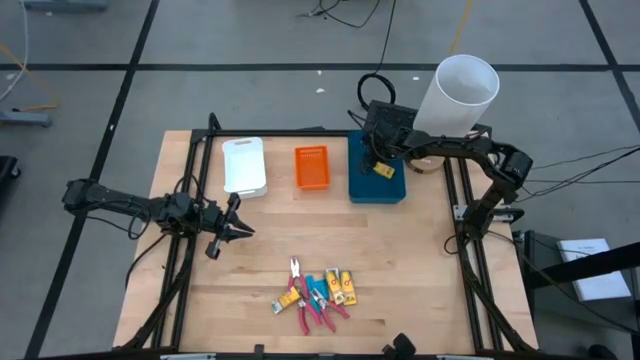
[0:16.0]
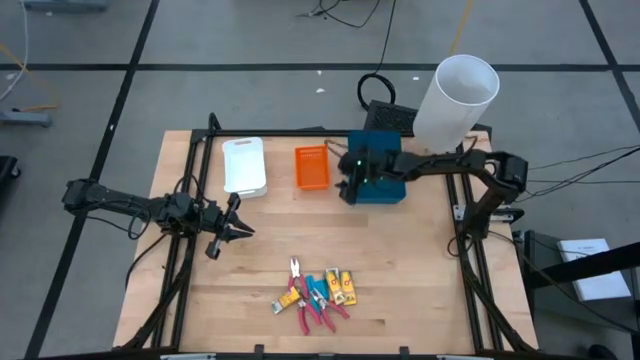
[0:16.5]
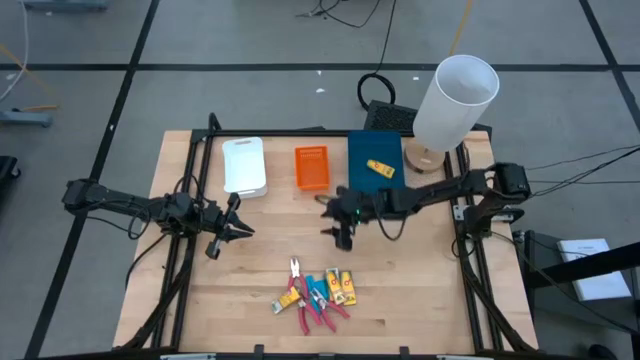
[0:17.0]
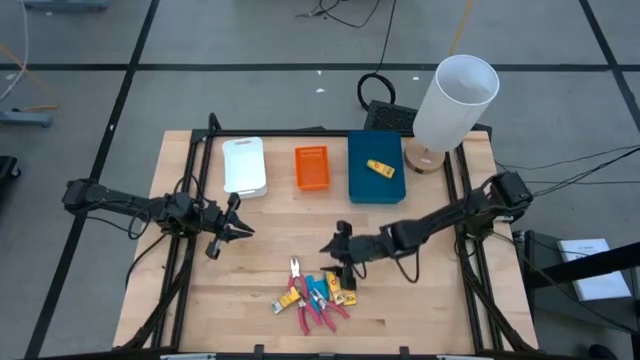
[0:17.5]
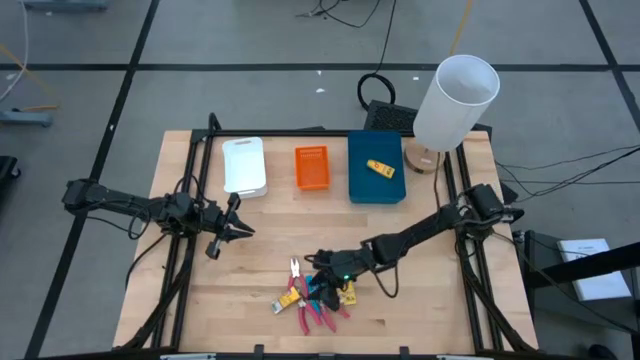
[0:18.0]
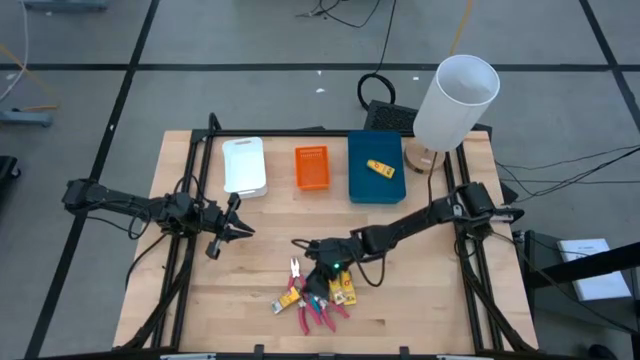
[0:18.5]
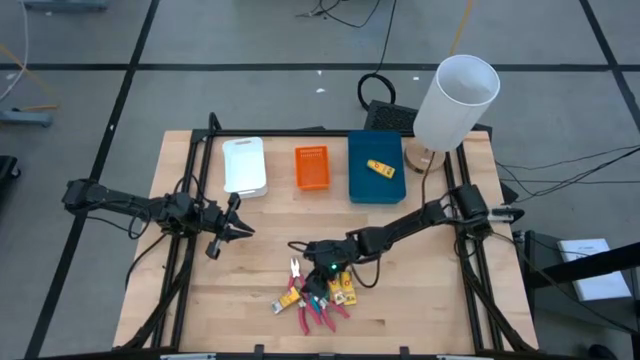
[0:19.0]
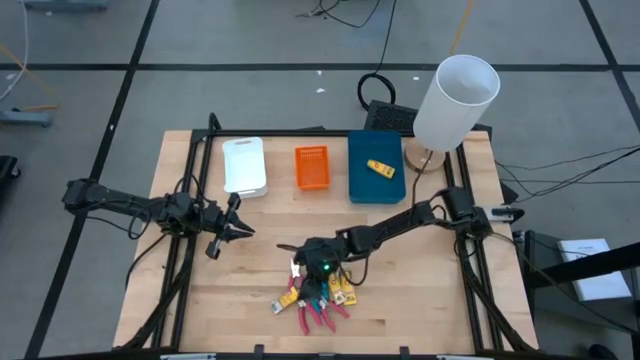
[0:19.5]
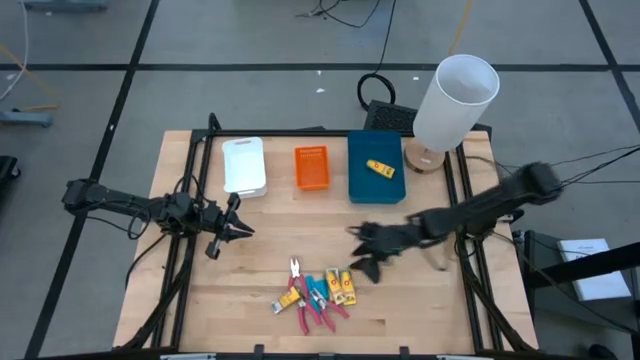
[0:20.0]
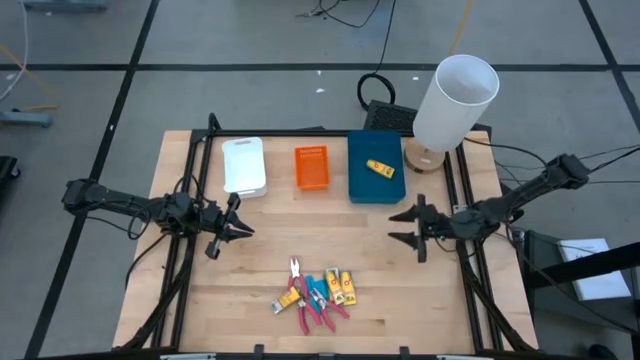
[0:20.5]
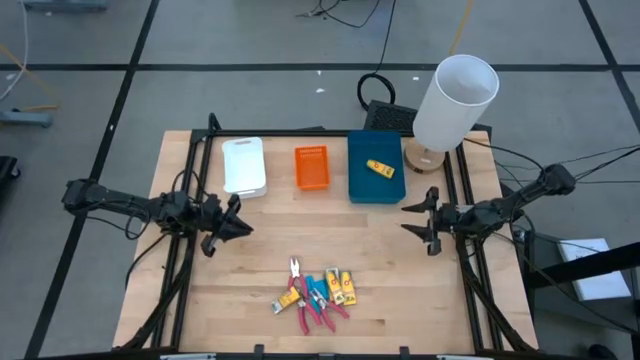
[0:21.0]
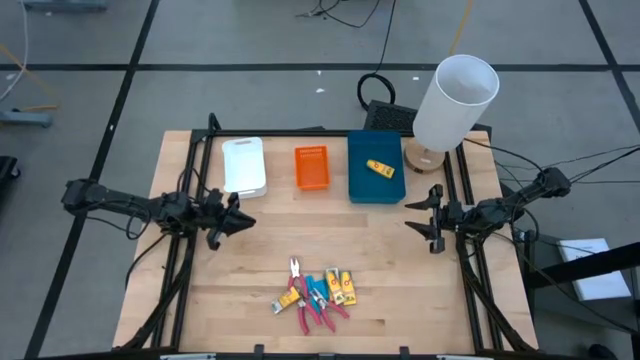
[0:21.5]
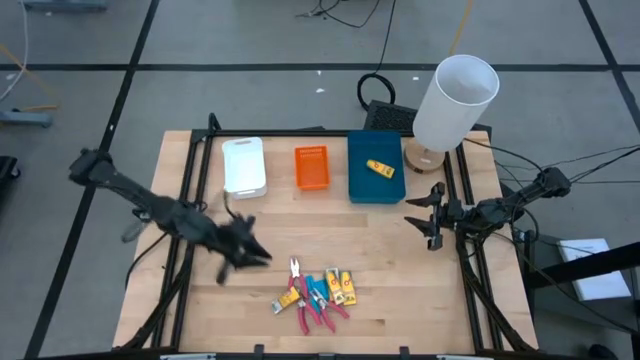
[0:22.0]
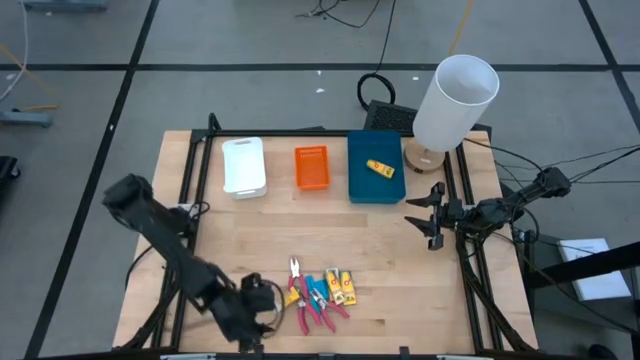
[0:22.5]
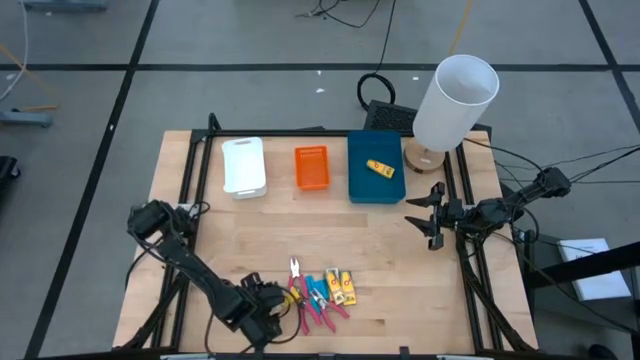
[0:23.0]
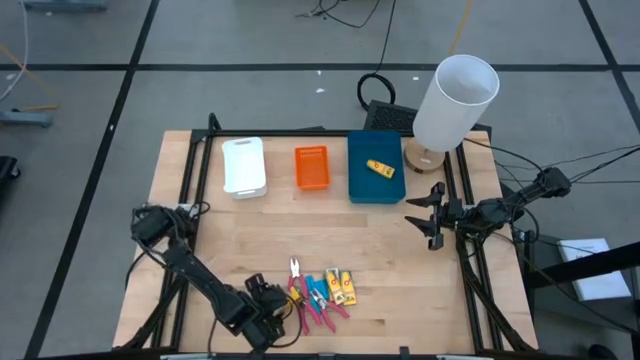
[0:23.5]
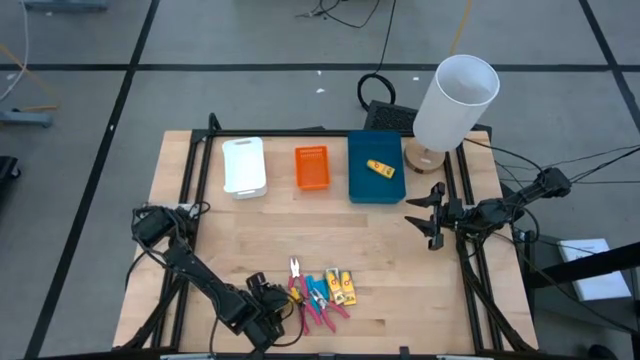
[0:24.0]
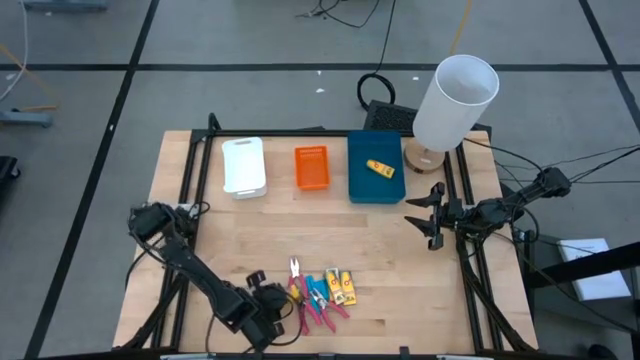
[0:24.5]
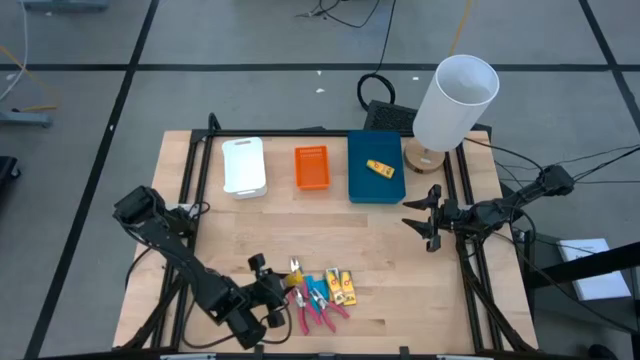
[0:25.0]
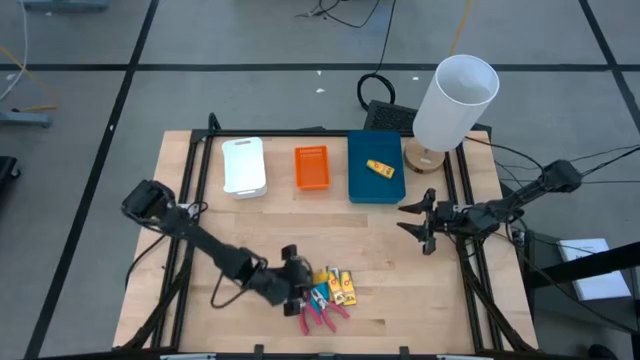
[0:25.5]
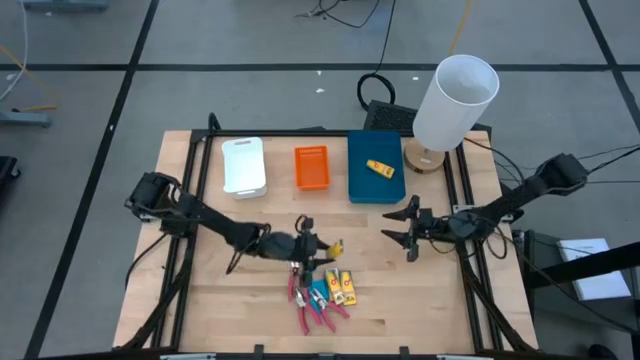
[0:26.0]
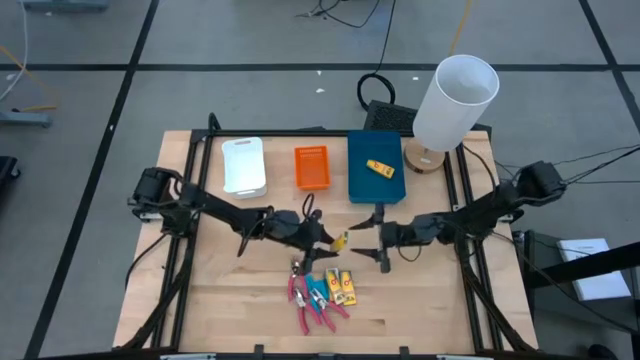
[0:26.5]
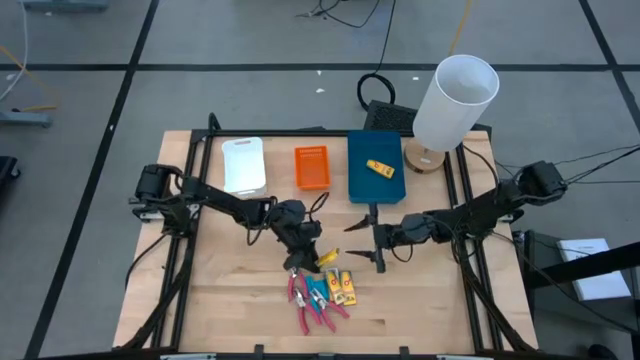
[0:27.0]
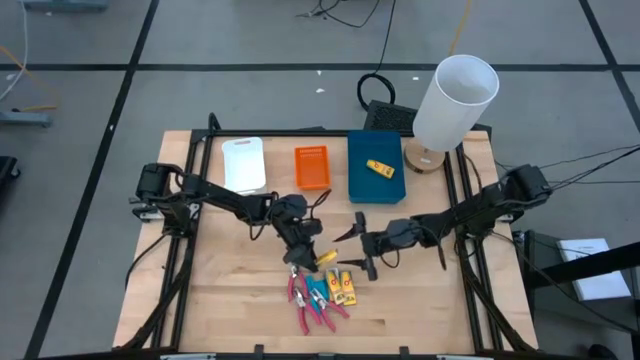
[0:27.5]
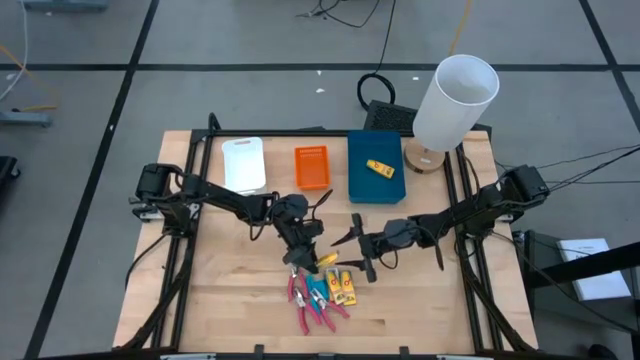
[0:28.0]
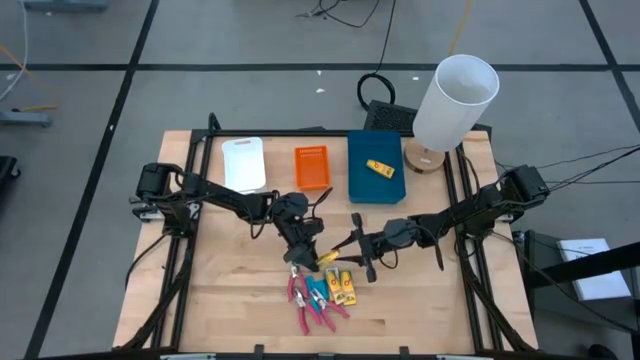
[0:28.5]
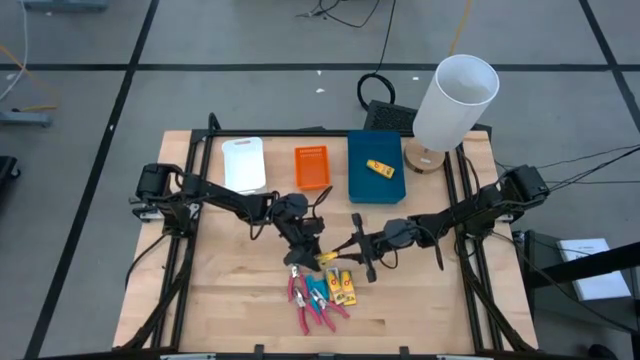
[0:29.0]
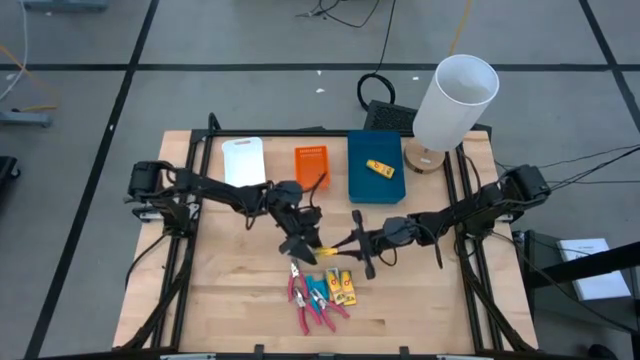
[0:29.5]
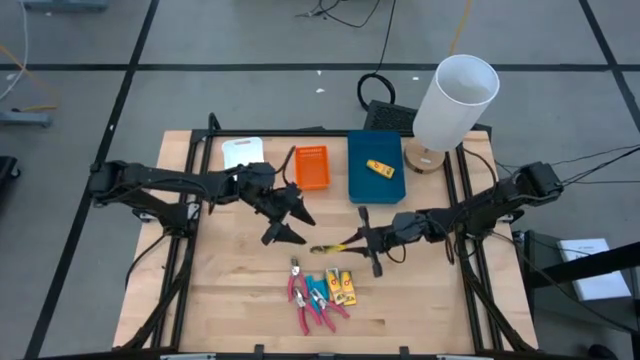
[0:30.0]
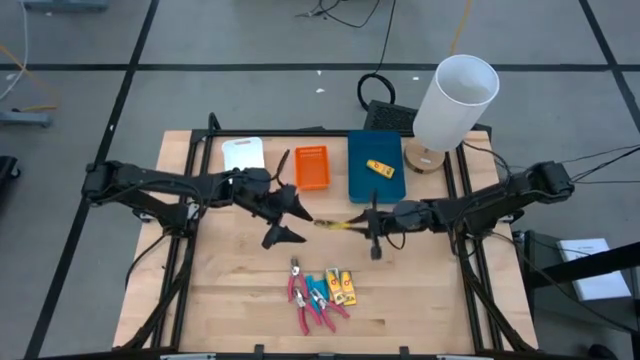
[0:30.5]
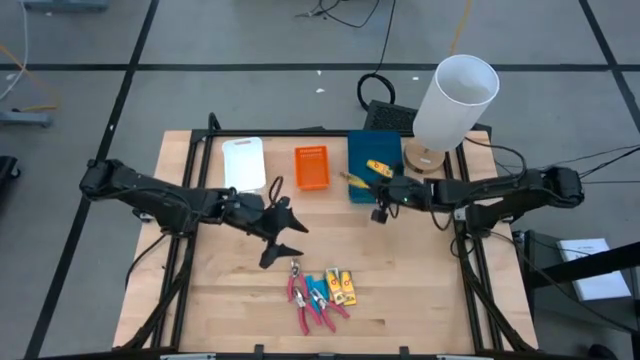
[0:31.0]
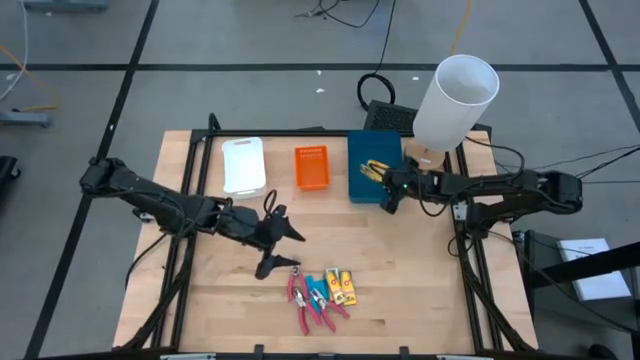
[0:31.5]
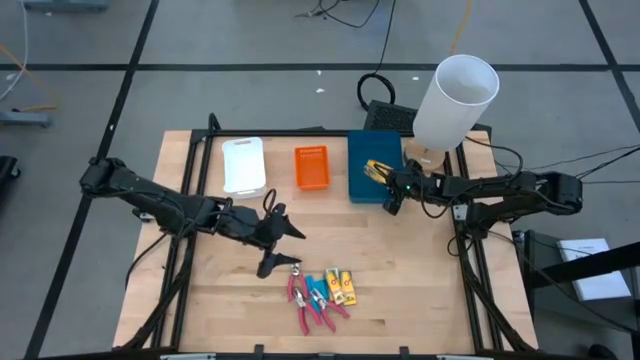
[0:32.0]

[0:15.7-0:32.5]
Task: Pick & Place School Supplies
Put the crayon box into the blue bin

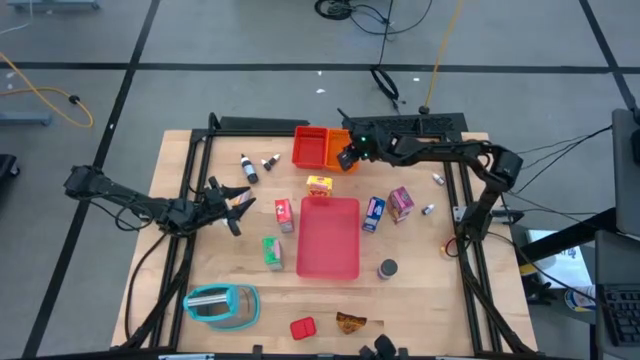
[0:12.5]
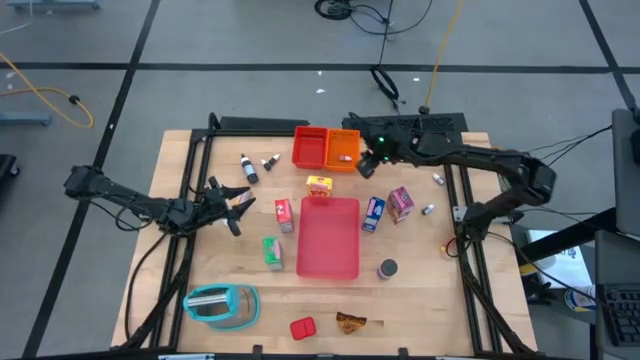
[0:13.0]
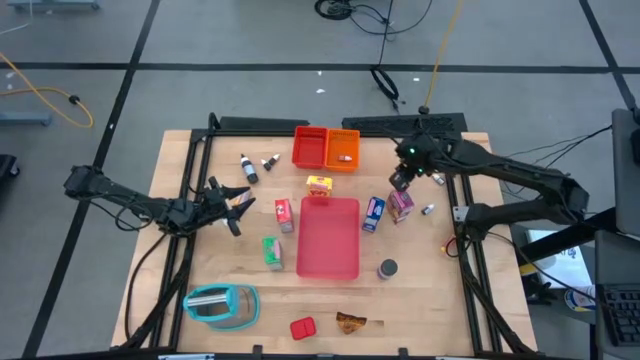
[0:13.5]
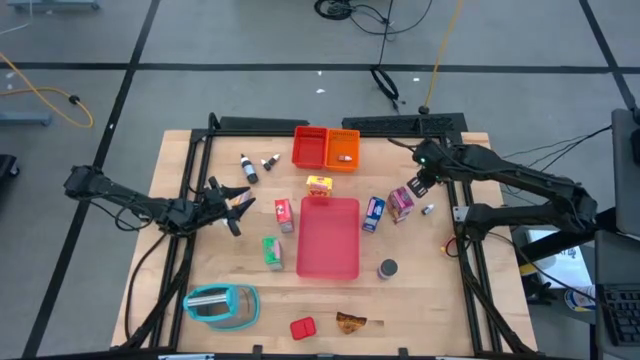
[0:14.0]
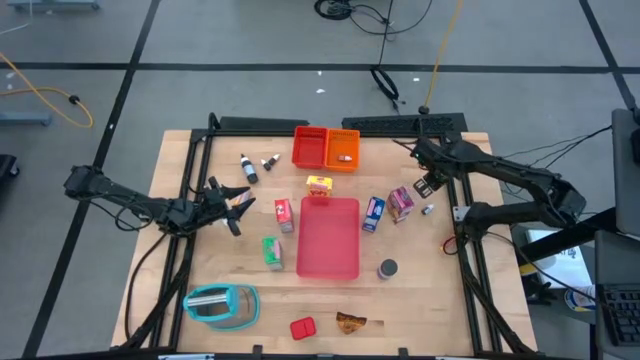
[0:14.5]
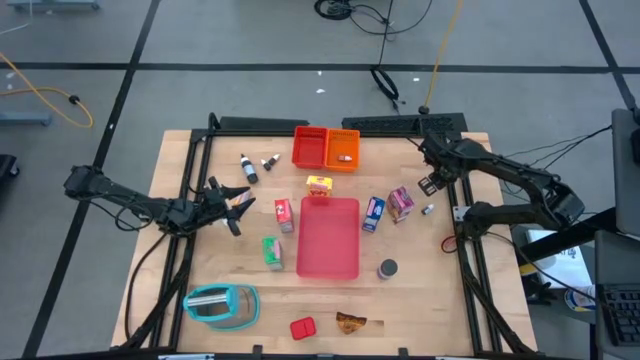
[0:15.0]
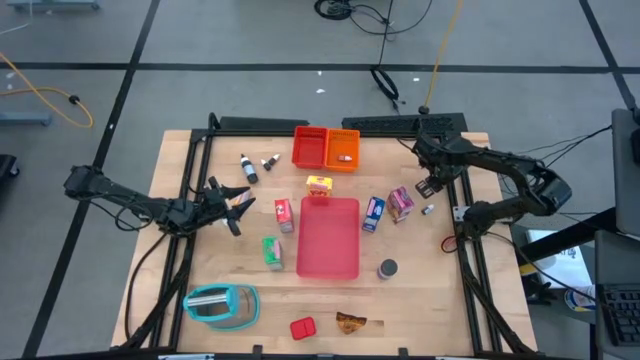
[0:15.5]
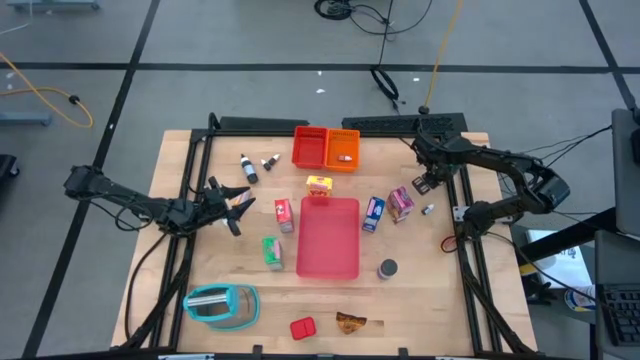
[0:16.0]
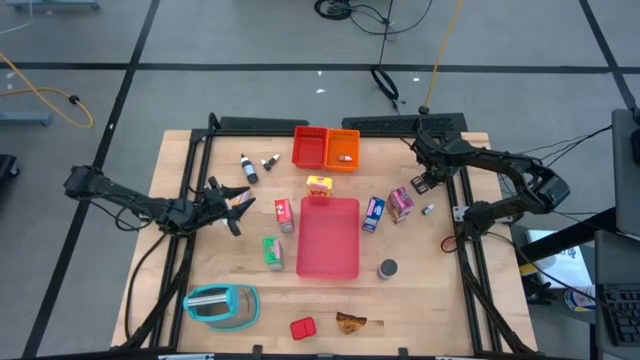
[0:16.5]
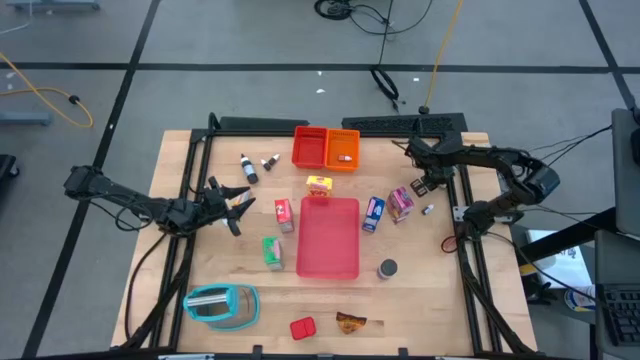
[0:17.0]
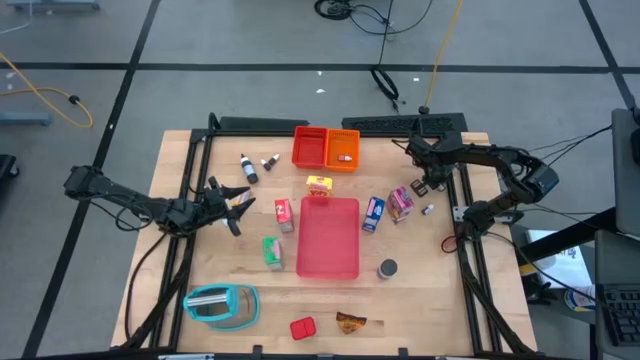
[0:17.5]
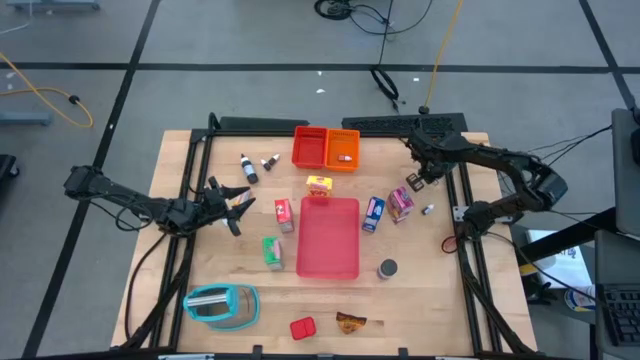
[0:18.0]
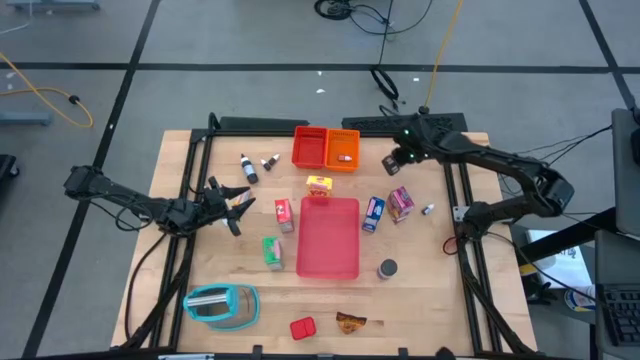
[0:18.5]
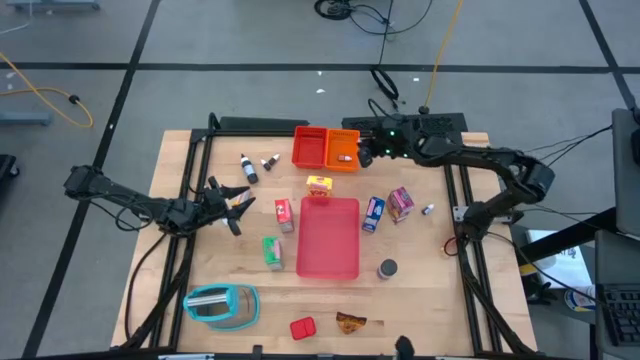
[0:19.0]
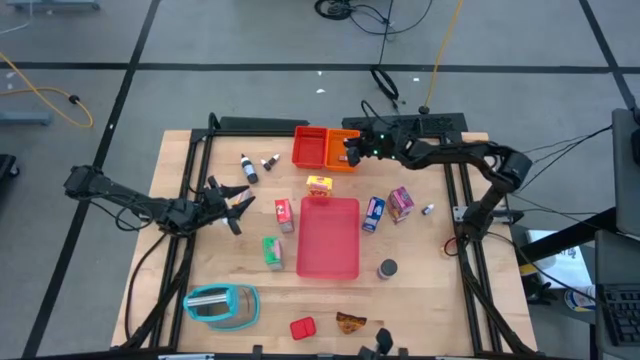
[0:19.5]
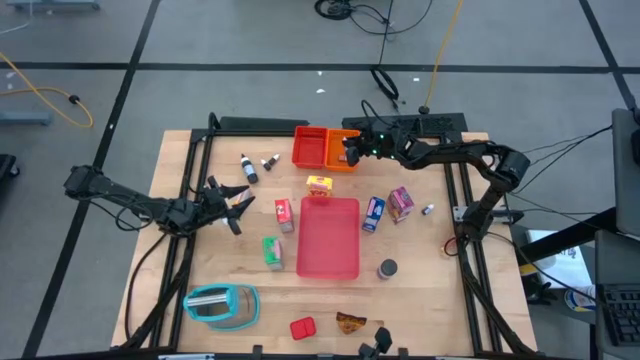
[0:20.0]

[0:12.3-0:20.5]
Task: Pick & Place Kitchen Items
Put the green food coloring bottle into the orange basket
